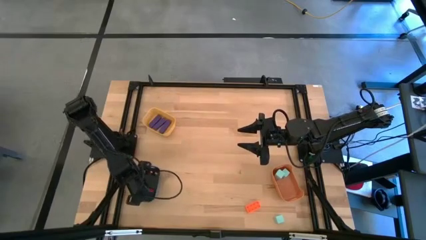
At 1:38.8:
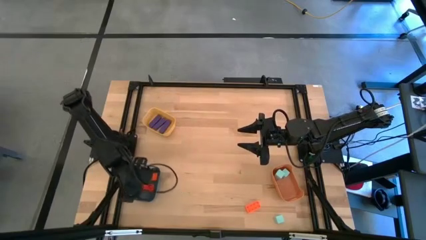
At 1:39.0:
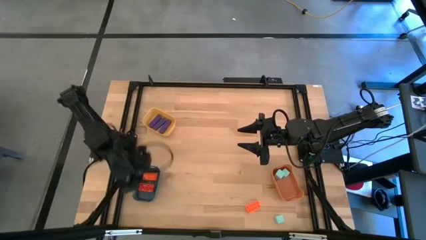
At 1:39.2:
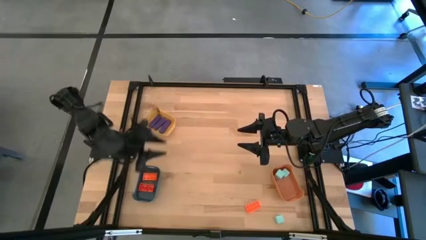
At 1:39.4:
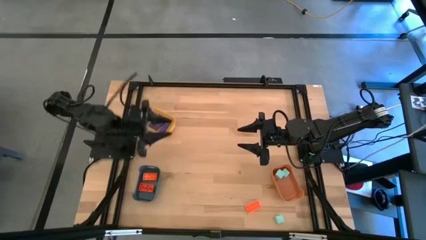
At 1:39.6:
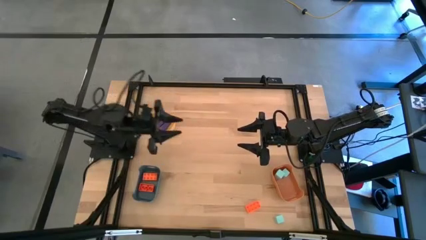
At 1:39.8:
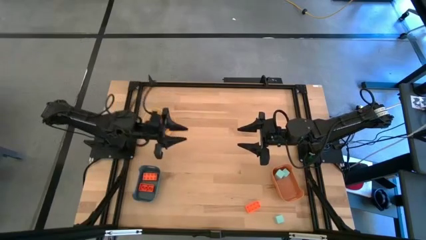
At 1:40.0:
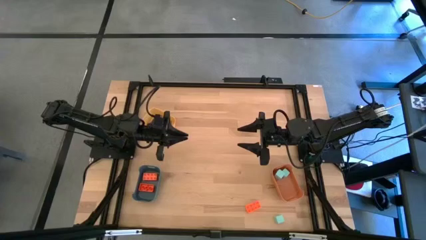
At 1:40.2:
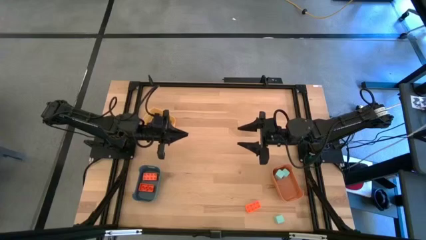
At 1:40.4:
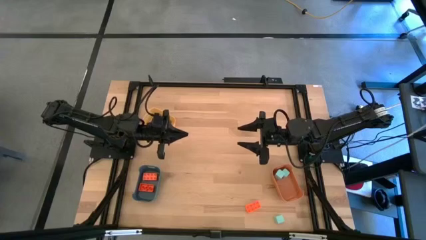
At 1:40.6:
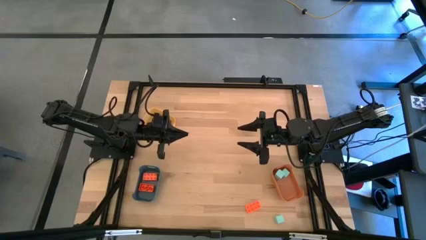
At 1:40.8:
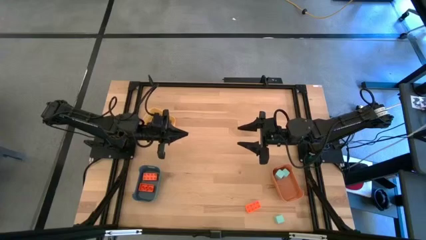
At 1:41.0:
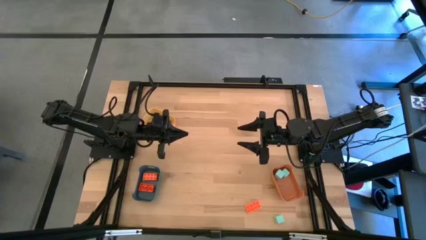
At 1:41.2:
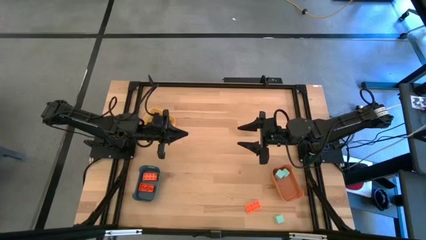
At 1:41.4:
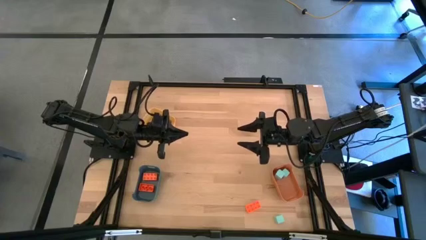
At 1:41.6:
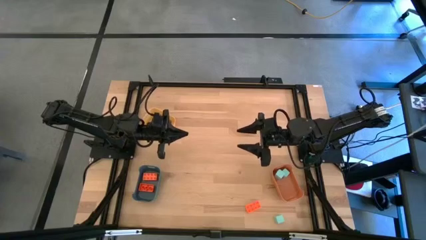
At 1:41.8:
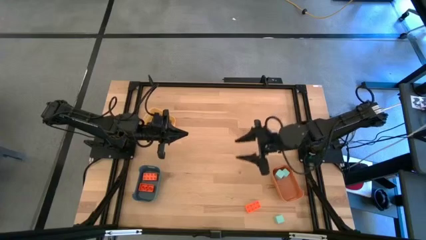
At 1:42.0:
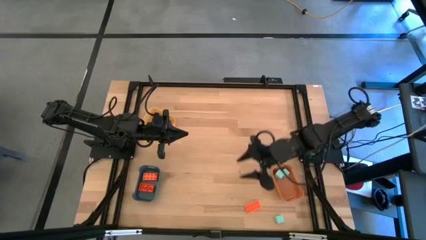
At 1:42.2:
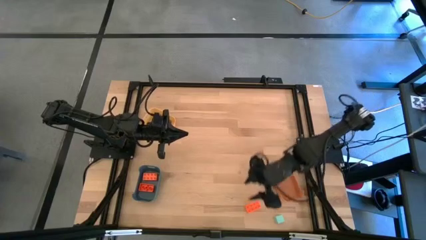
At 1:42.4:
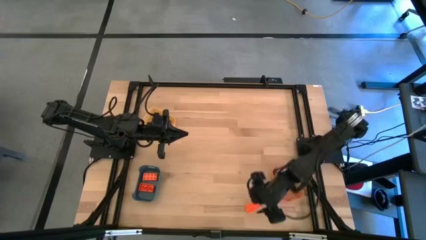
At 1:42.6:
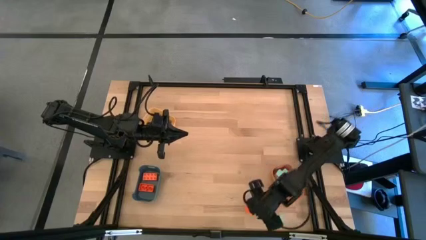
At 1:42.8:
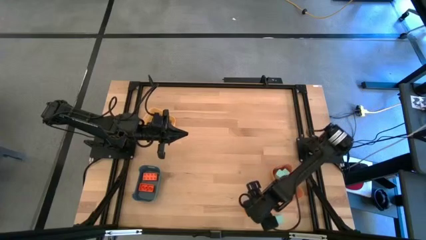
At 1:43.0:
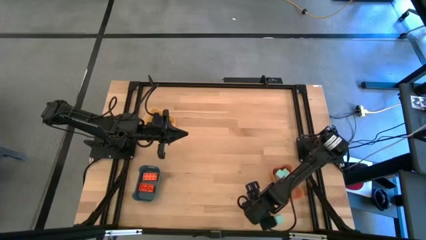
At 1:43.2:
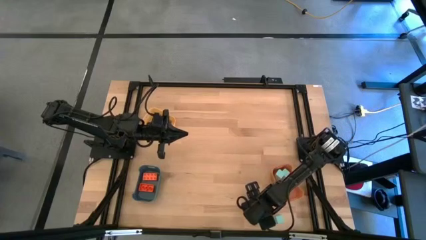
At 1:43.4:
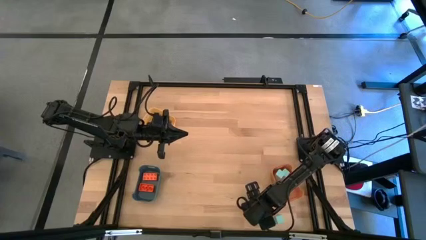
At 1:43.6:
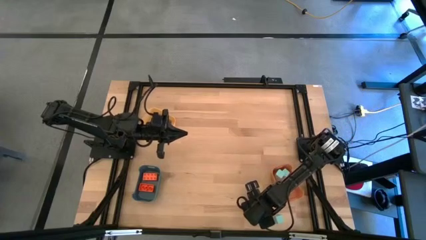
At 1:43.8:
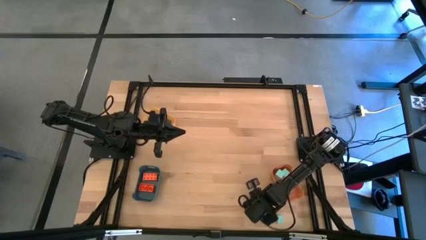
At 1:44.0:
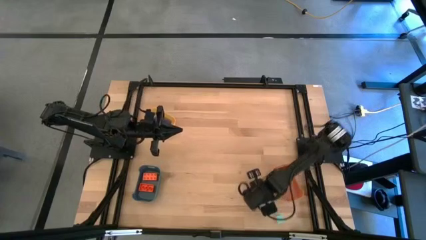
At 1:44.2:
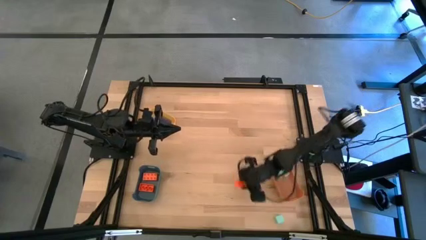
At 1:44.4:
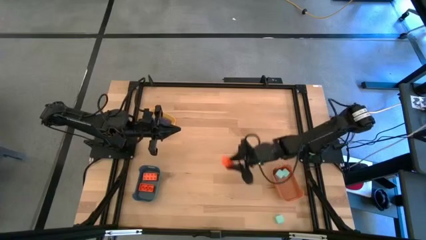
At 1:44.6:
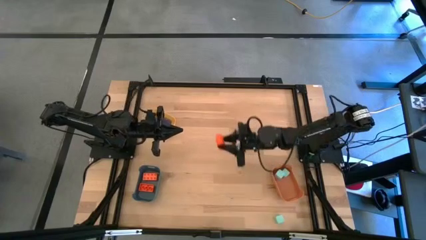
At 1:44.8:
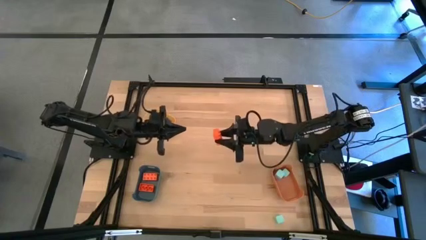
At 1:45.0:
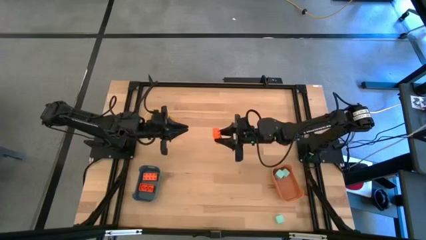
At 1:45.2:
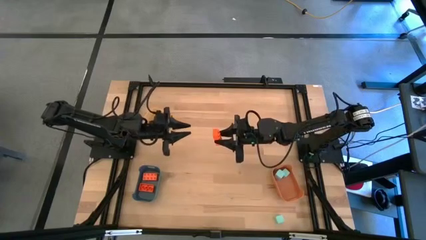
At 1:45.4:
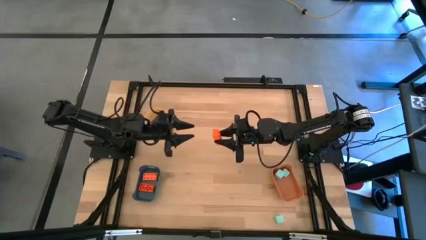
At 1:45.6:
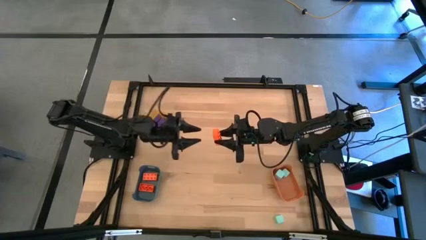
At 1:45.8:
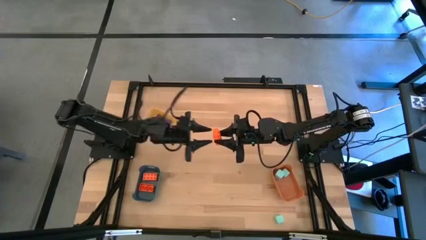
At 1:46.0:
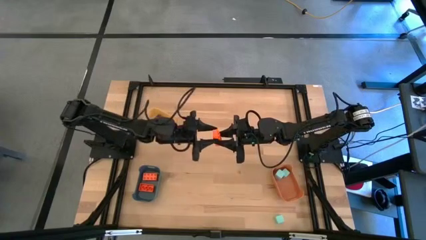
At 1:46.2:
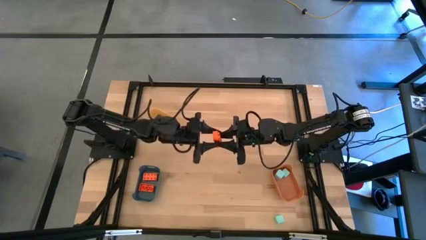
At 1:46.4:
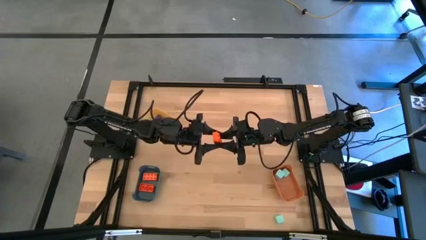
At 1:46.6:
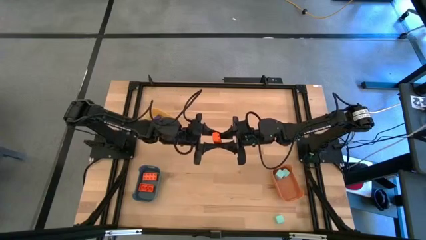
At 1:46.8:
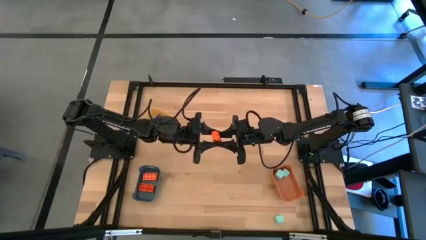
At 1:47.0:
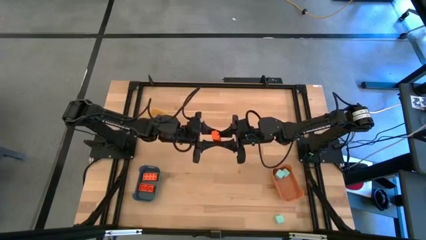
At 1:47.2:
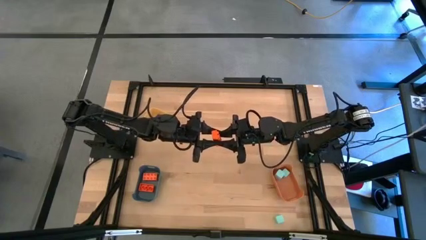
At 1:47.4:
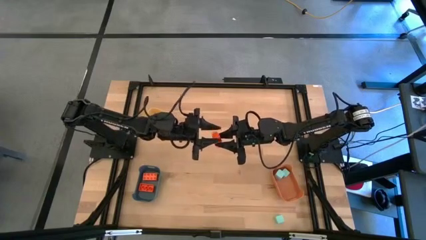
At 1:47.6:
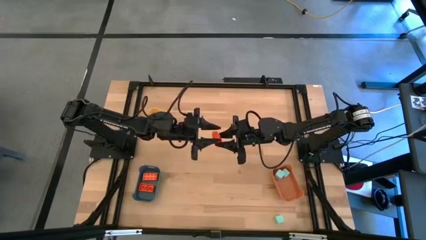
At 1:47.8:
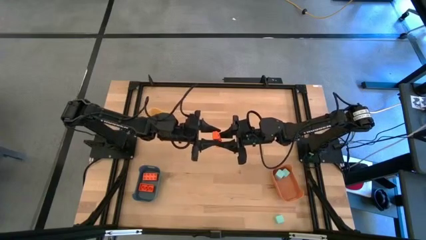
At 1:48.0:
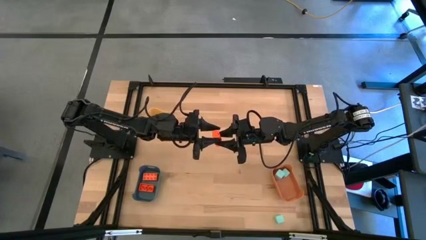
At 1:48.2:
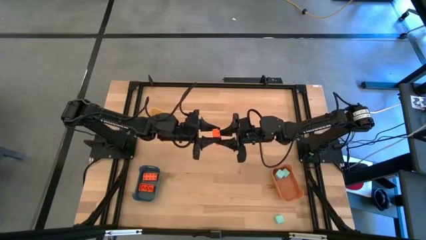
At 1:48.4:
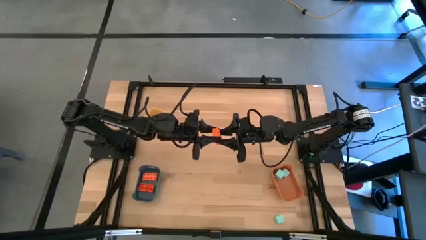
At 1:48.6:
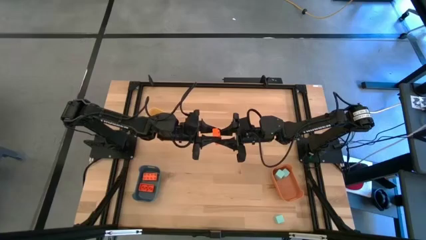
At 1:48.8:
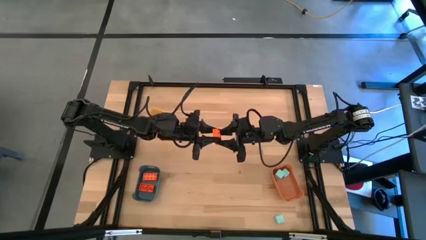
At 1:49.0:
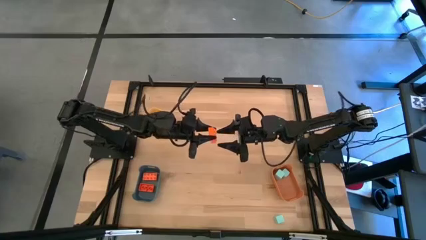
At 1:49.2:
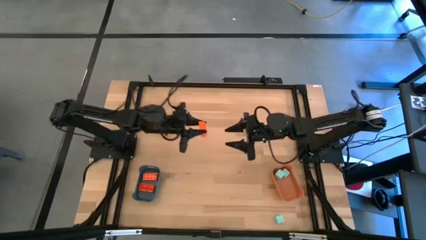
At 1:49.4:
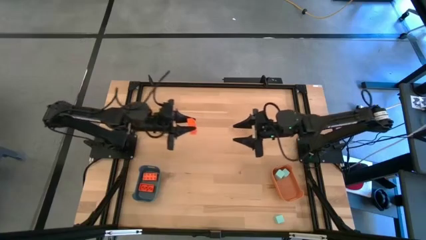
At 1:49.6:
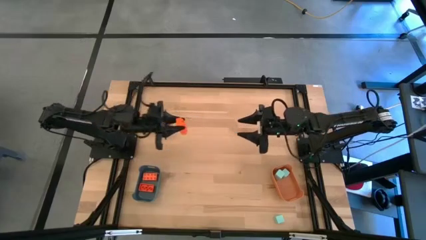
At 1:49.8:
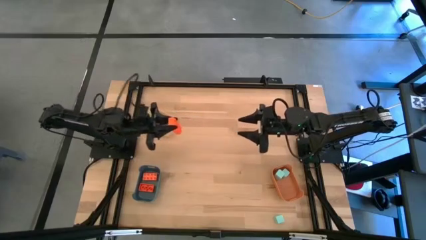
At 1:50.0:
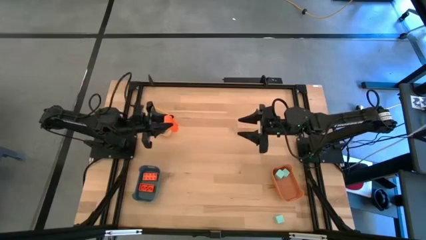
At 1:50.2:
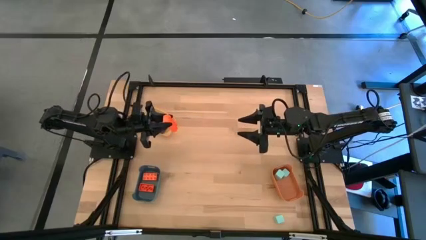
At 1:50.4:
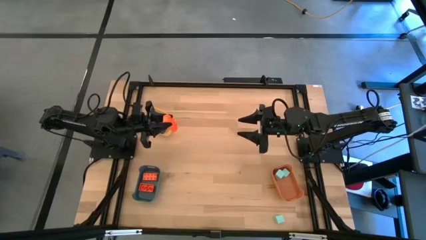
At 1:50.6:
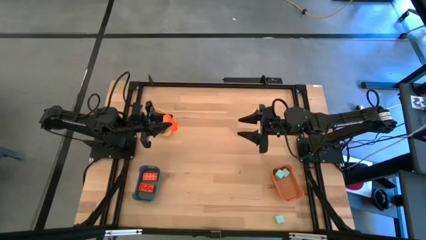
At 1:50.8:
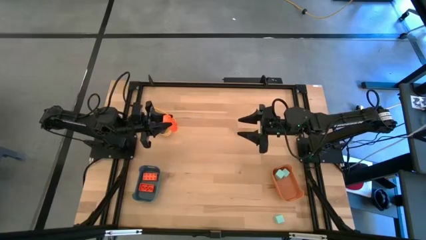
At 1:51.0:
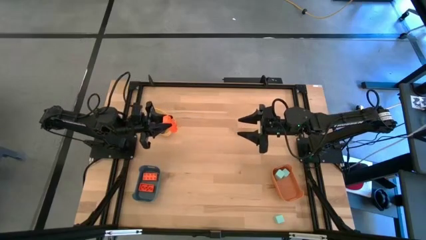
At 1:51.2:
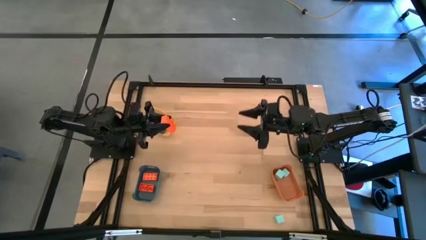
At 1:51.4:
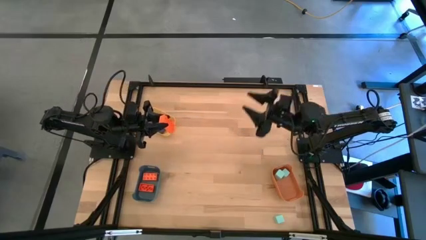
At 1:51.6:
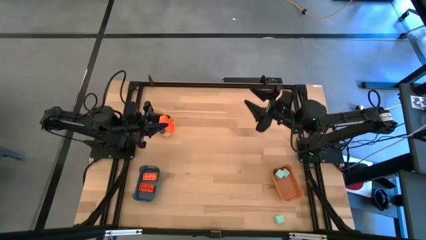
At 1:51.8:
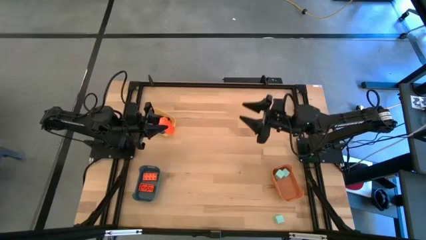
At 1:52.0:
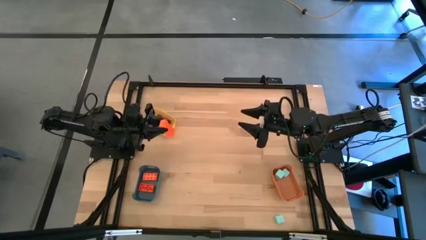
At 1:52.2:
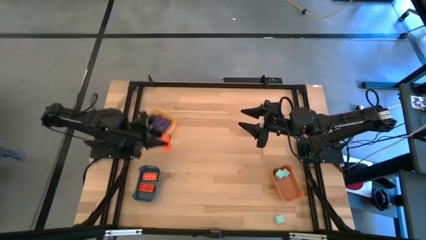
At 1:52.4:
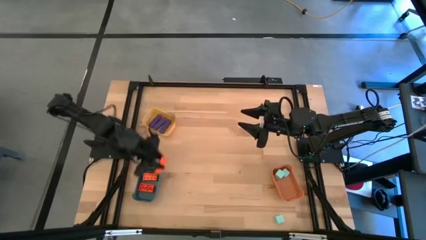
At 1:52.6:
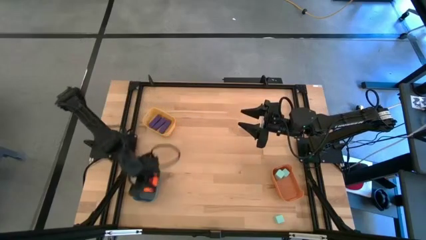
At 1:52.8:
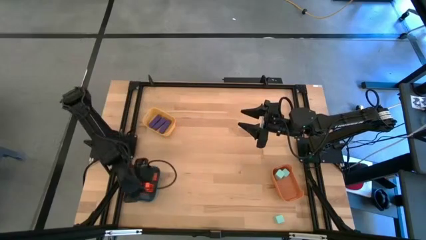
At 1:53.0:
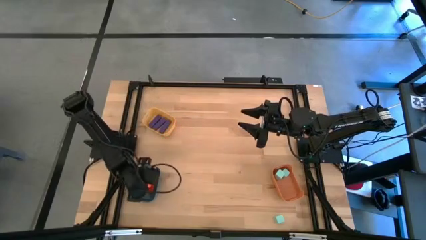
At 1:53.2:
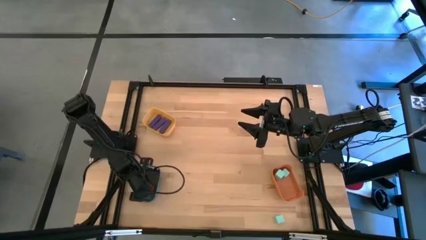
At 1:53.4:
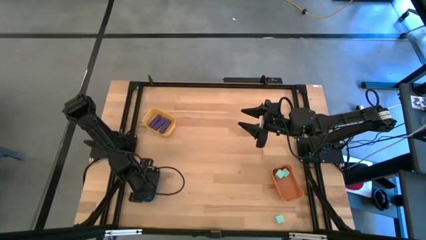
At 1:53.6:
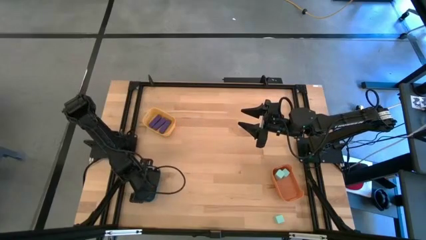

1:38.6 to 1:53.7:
Task: Sort & place blocks by color
Put the orange game piece into the green bin
